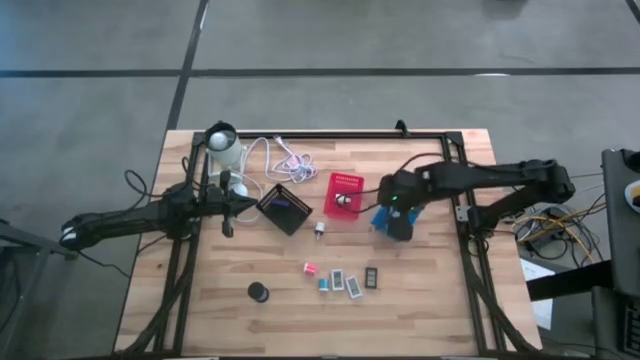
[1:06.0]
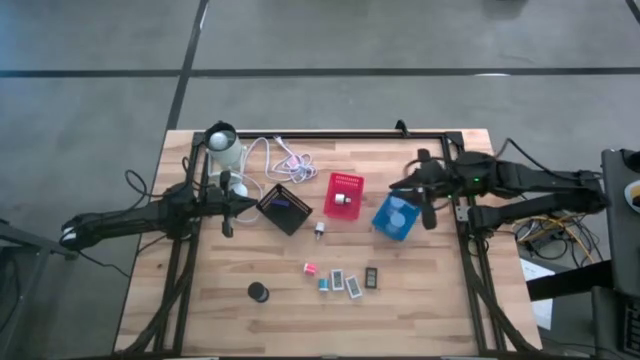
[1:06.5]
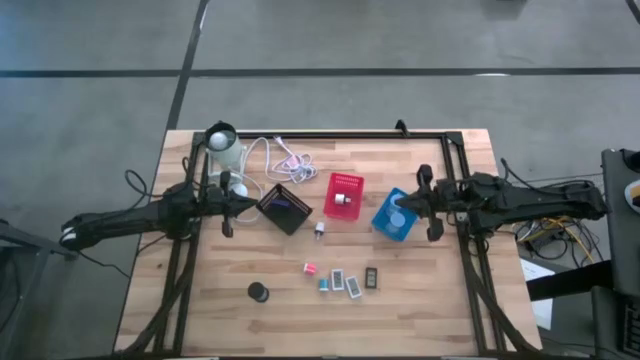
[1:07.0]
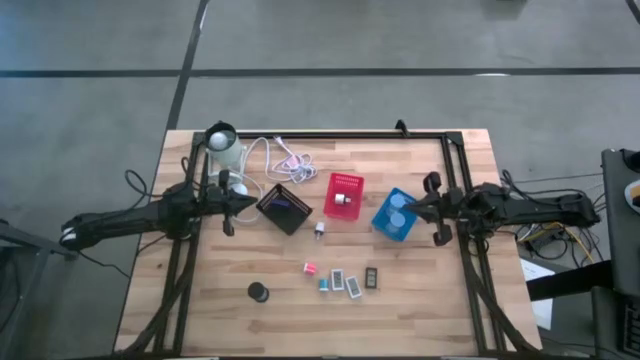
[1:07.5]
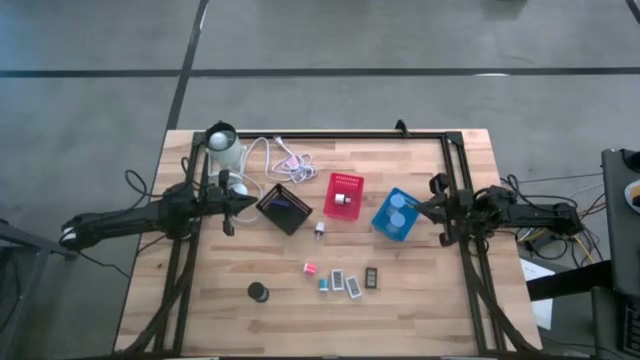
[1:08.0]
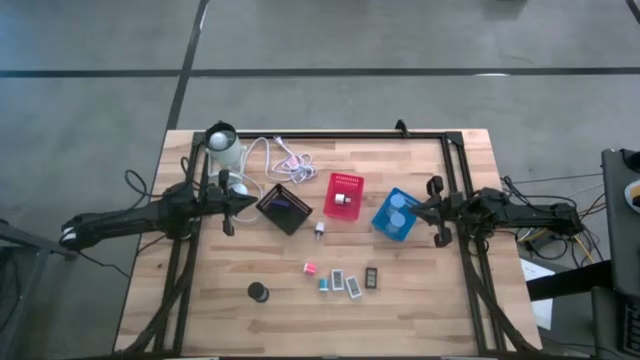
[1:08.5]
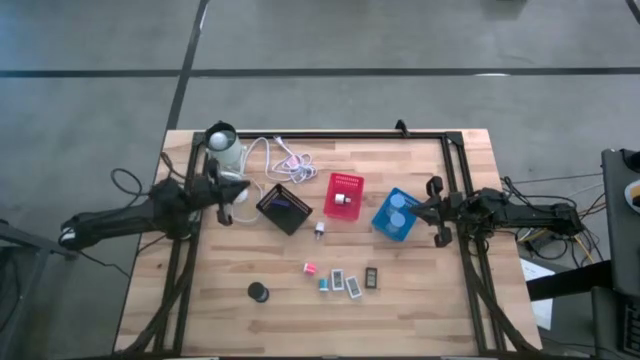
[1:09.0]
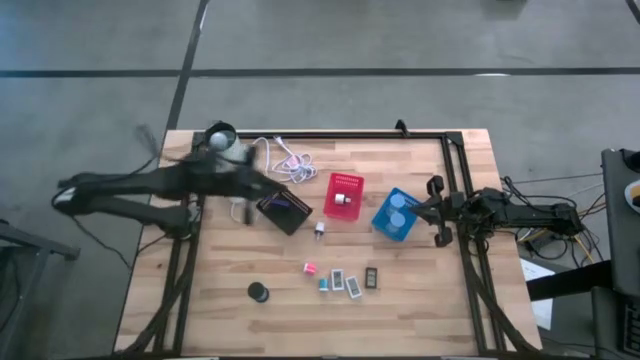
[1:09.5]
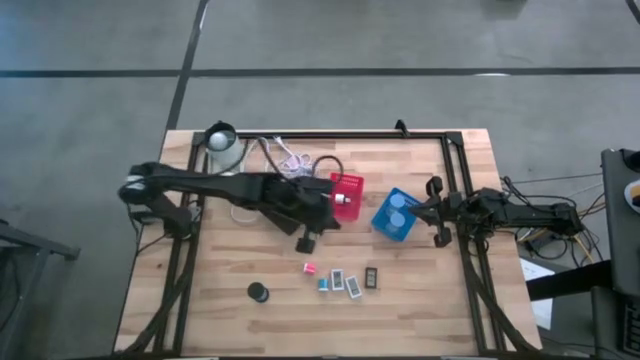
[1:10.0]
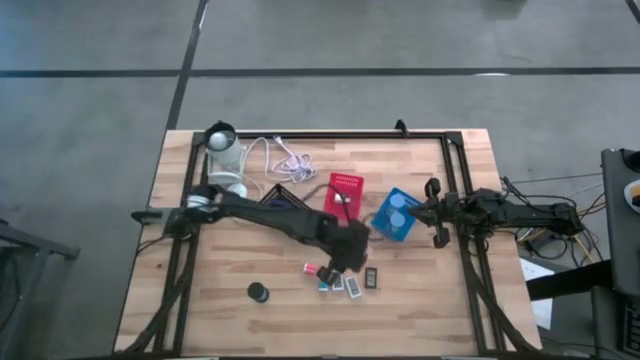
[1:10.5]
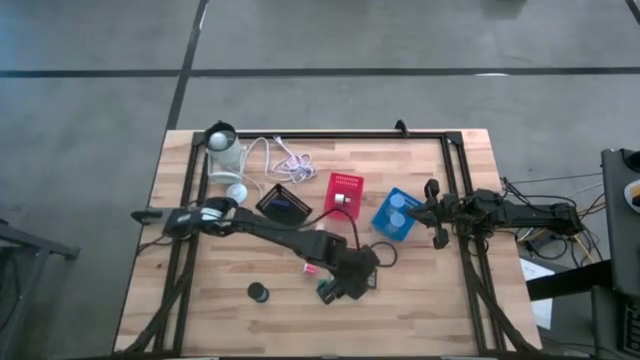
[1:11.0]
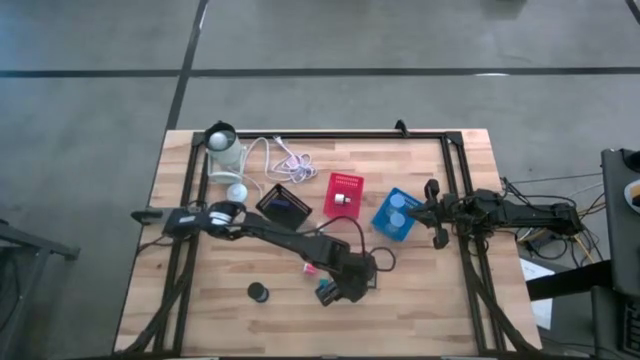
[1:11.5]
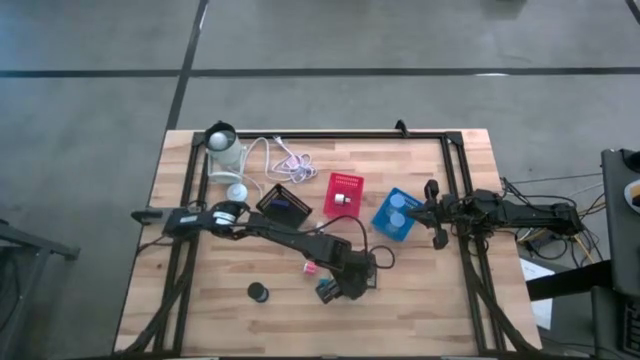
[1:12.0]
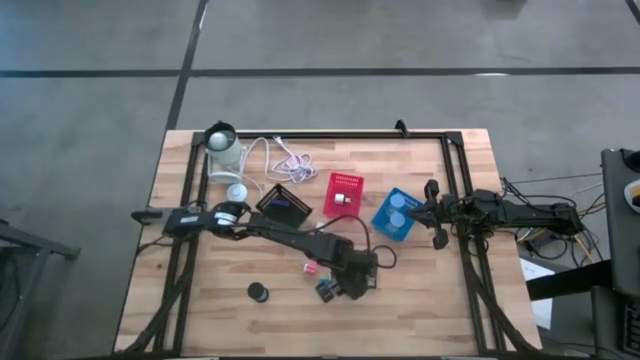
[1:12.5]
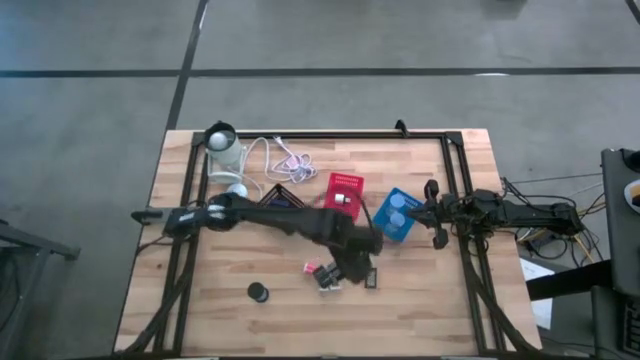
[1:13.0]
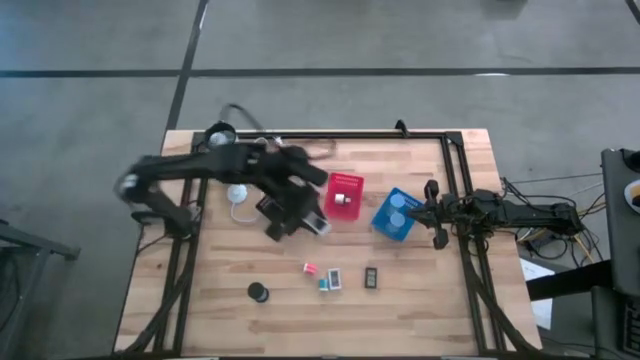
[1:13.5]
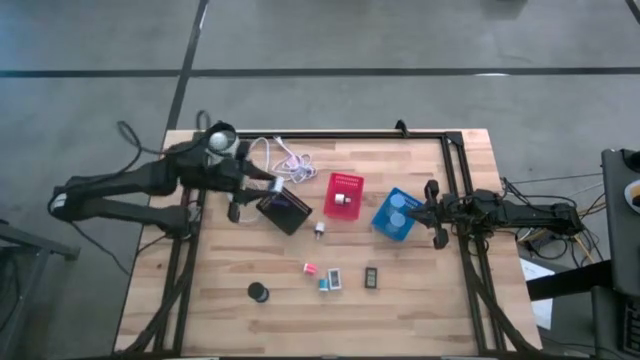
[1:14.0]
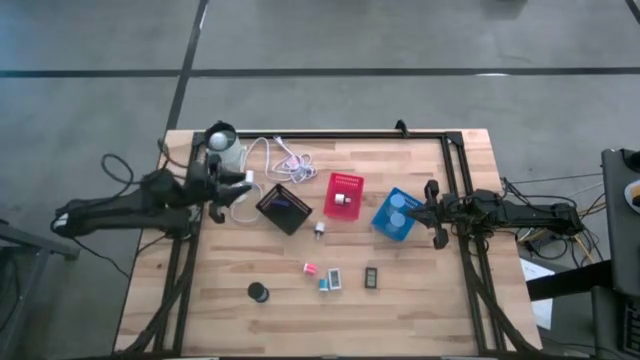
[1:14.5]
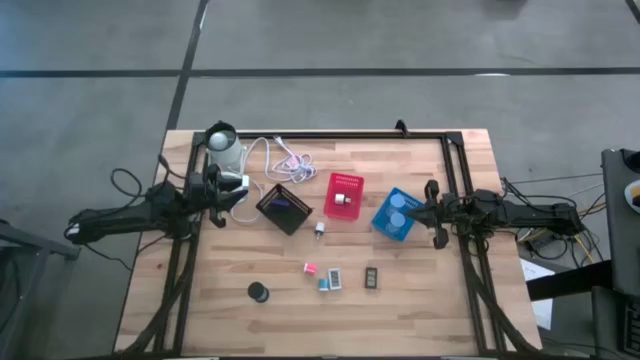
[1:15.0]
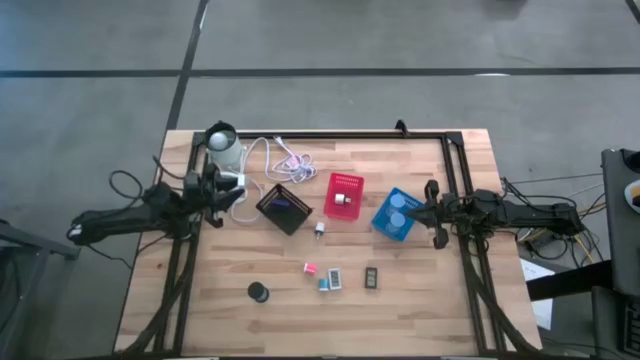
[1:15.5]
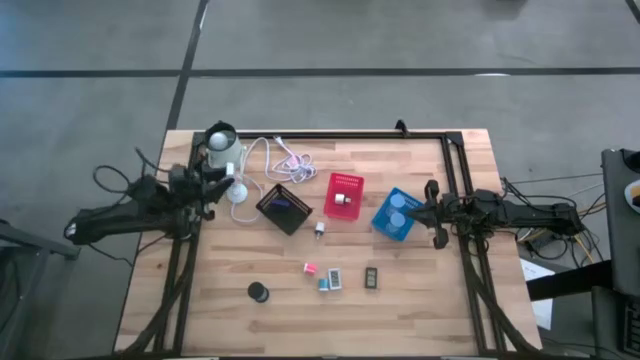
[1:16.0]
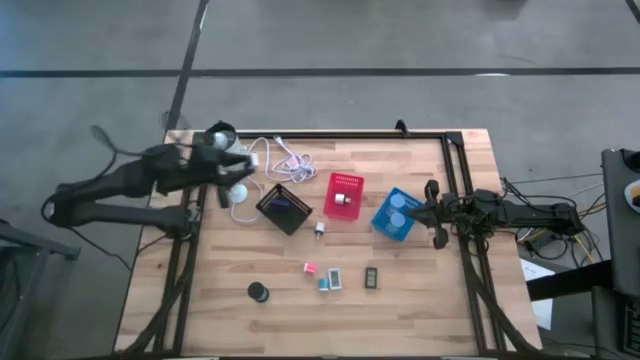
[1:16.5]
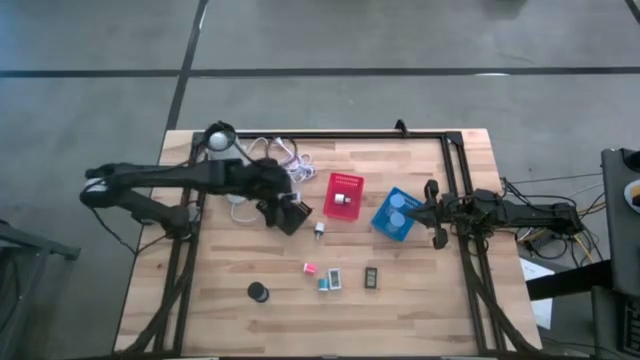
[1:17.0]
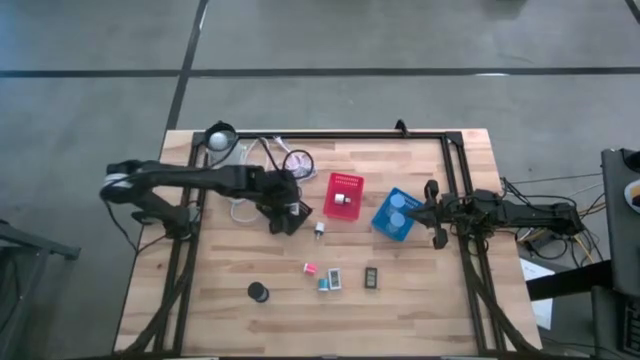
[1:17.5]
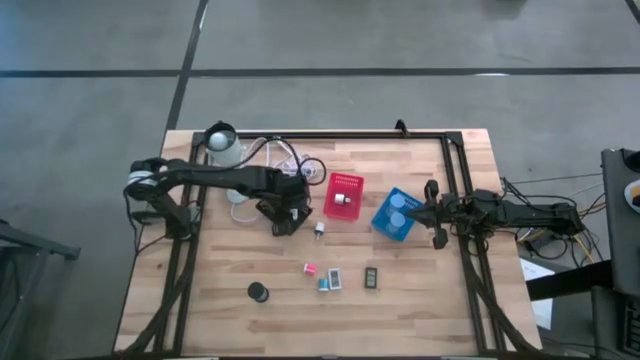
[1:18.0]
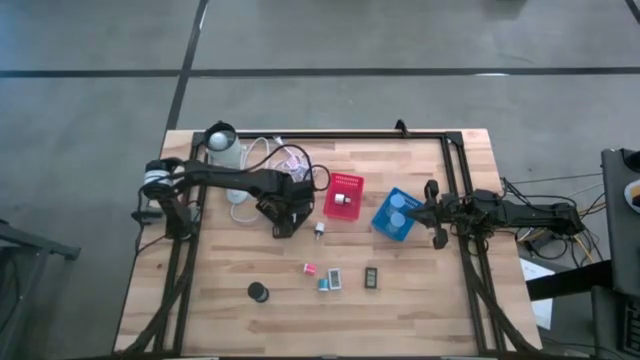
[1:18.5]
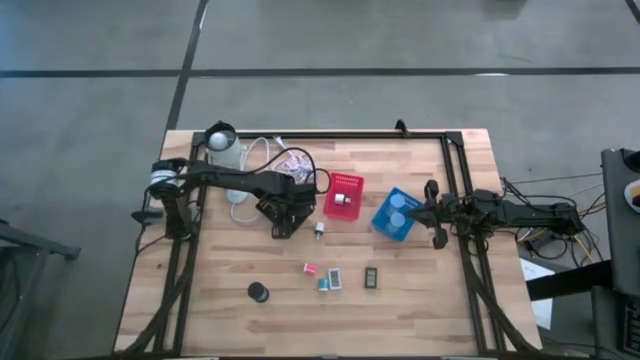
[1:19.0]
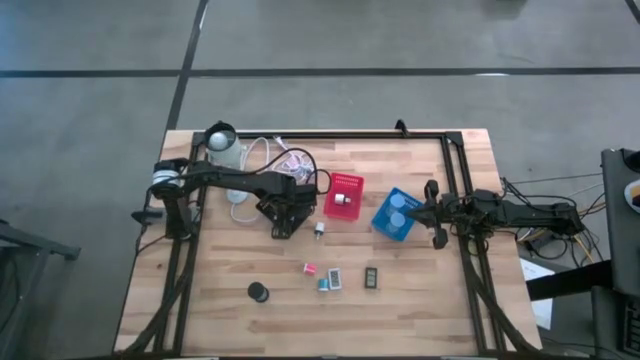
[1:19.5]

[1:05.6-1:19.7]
Task: Pick & Place Office items
Put the white digital clock into the black basket

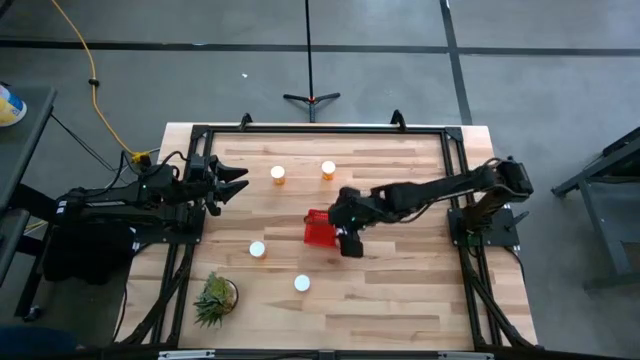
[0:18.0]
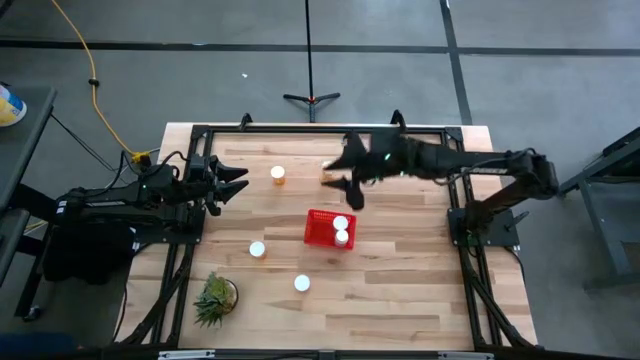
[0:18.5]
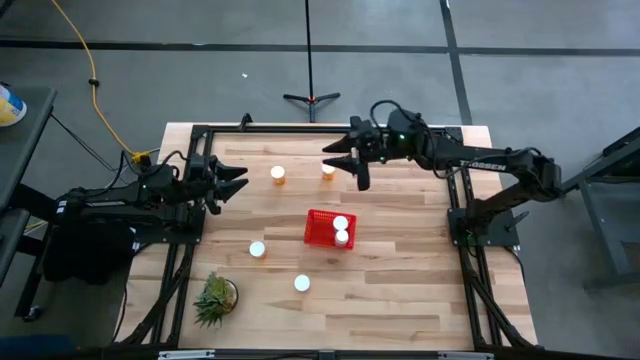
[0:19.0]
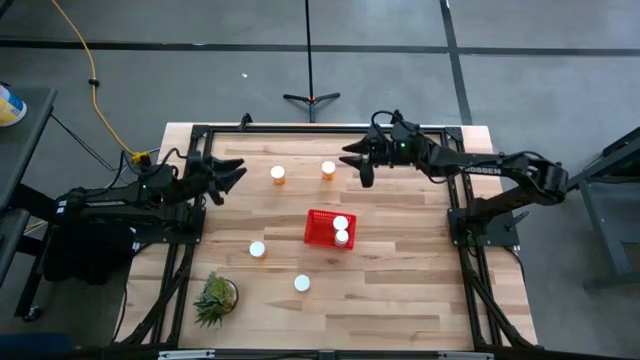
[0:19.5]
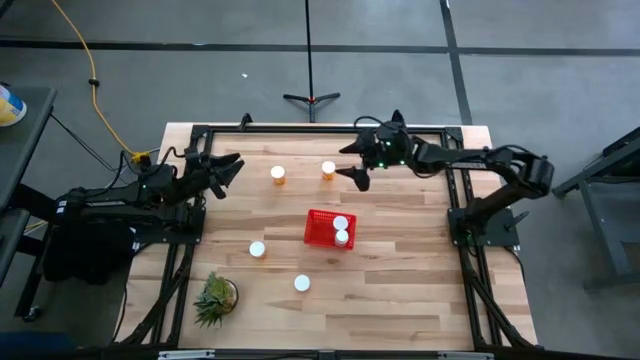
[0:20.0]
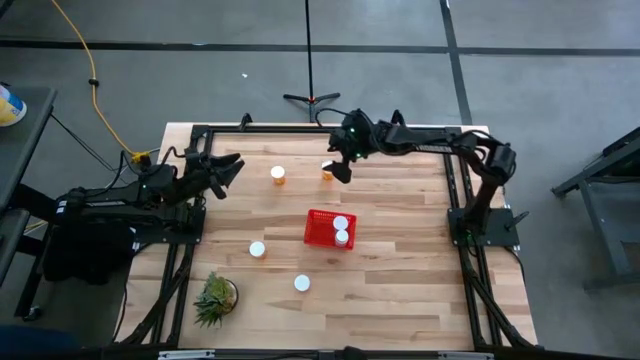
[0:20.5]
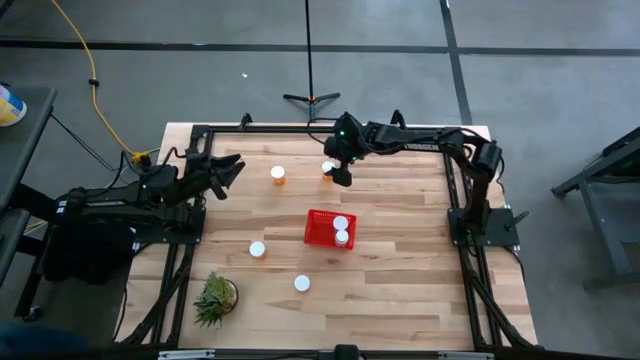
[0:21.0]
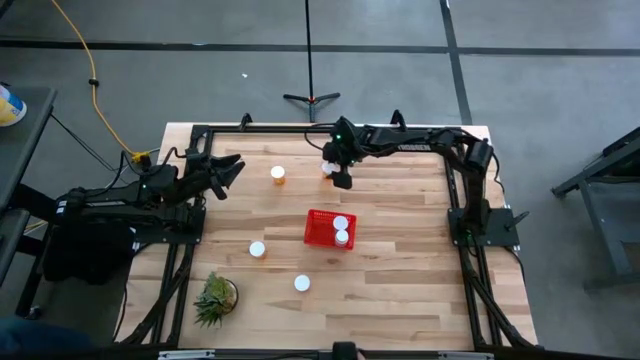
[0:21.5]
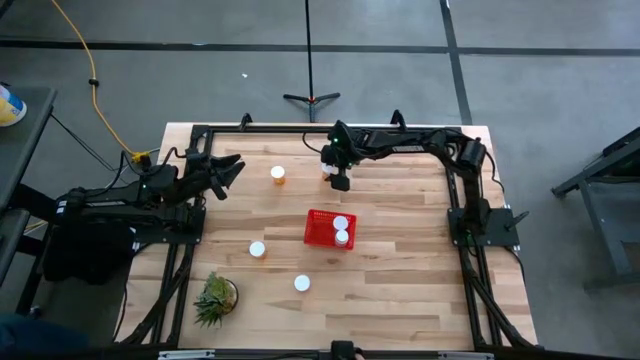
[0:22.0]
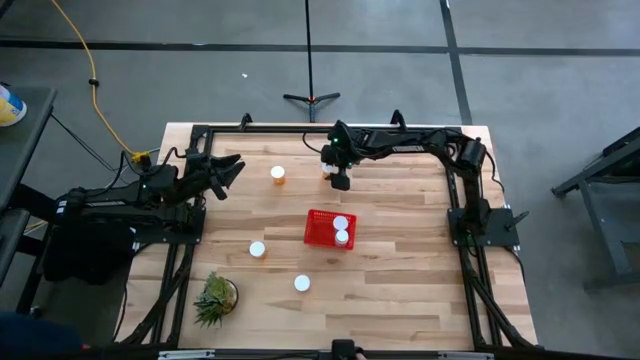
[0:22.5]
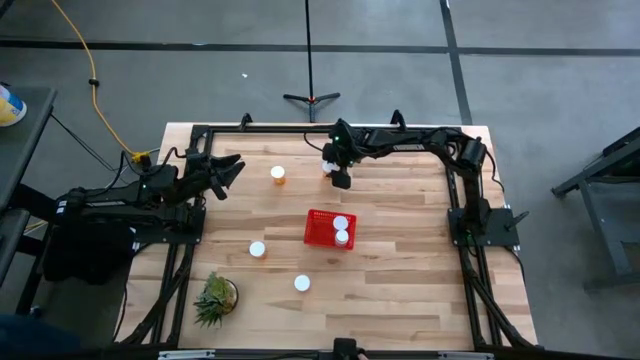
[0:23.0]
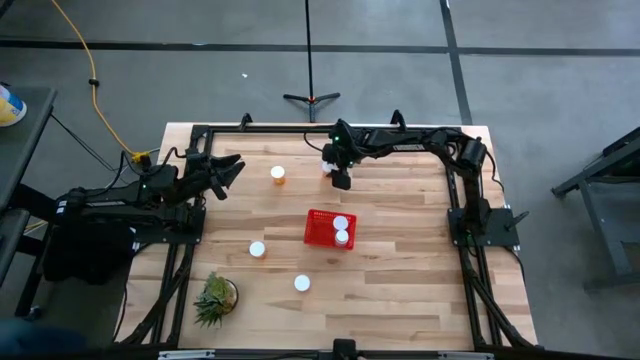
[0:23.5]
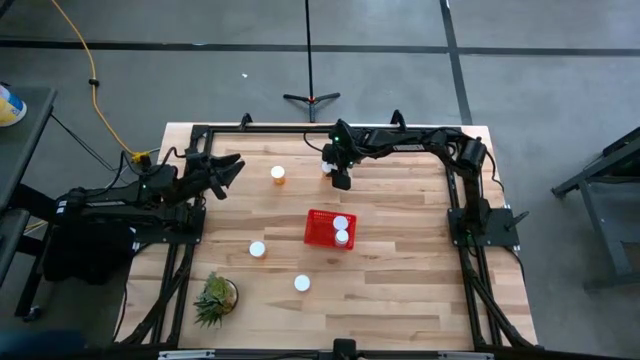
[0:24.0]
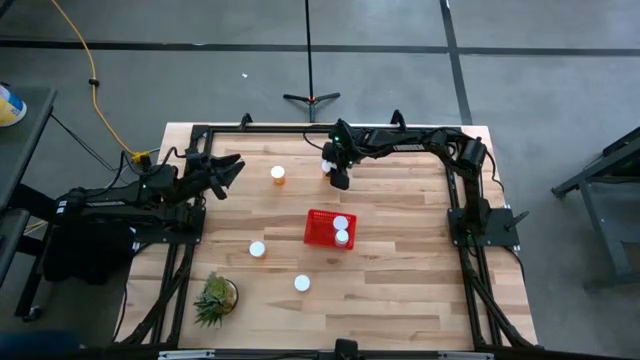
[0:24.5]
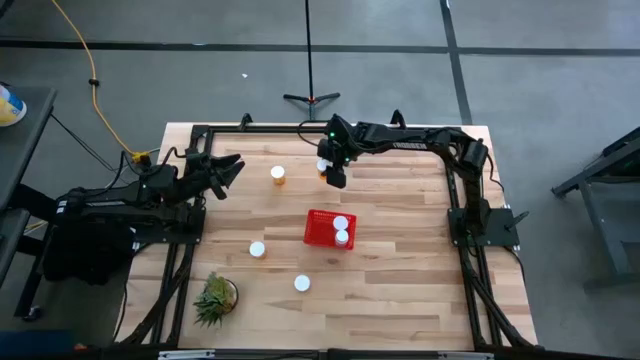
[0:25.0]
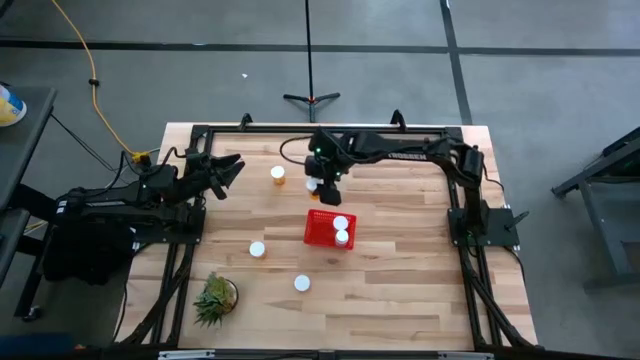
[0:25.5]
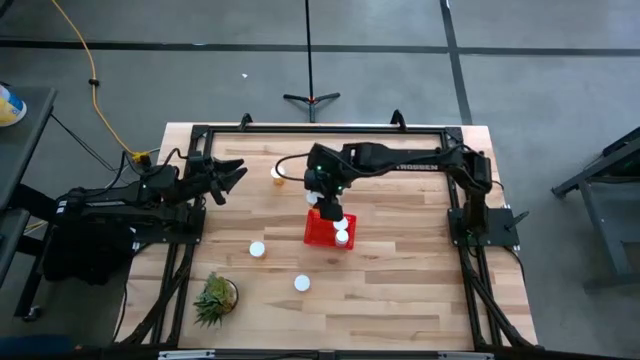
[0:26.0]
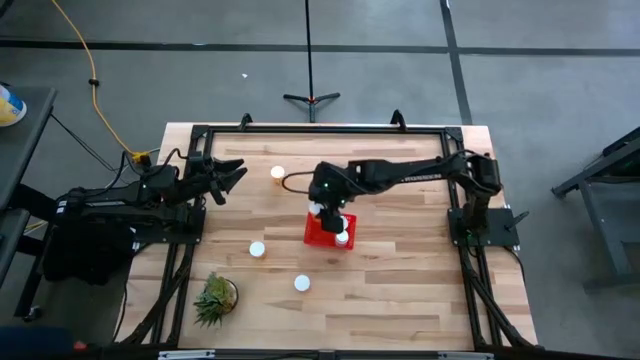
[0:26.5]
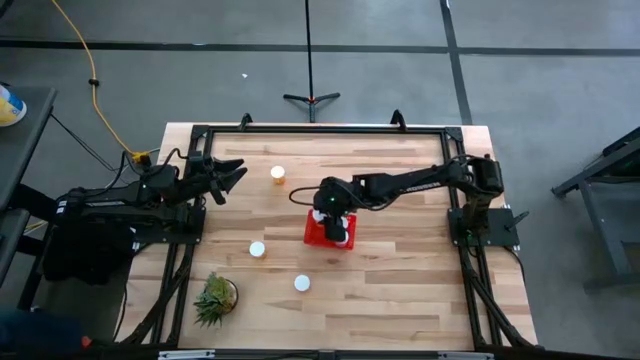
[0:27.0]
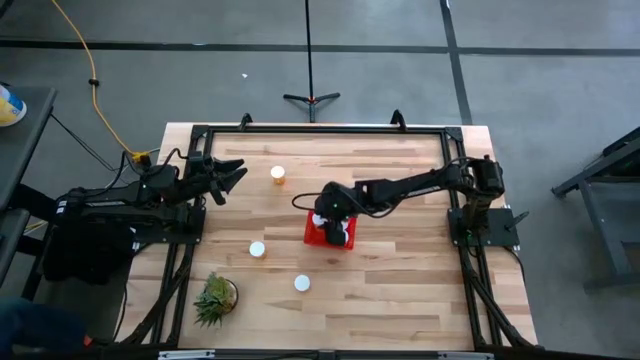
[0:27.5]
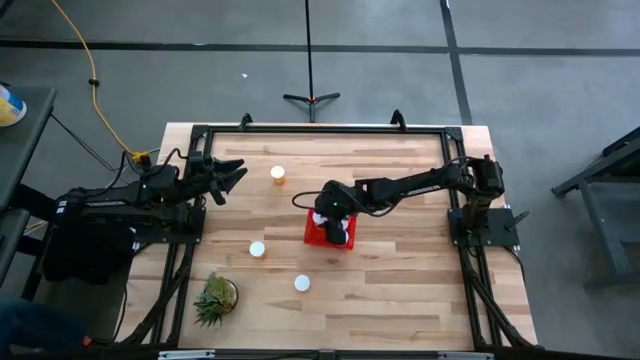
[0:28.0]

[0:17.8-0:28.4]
Task: Pick and place pill bottles into a basket
Put the orange pill bottle into the red bin
